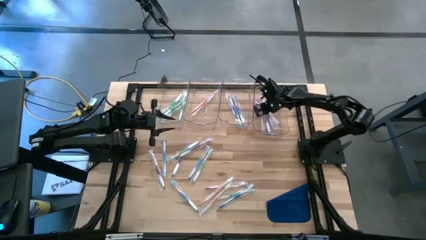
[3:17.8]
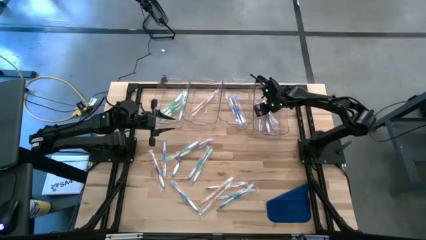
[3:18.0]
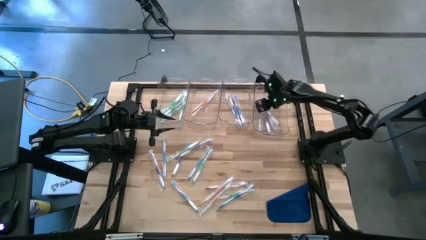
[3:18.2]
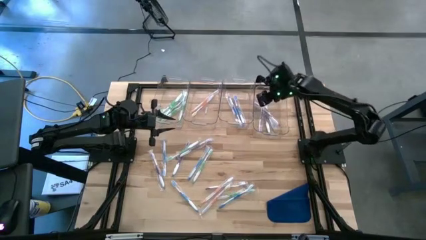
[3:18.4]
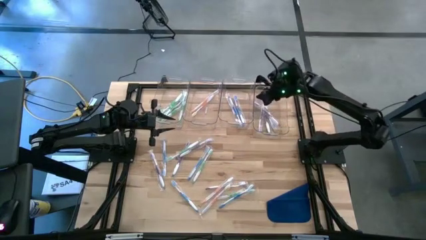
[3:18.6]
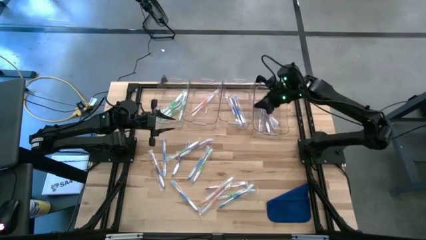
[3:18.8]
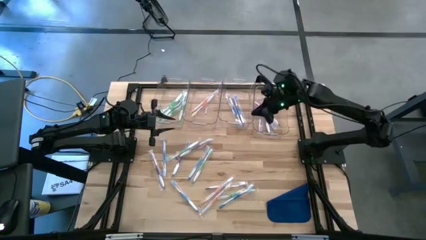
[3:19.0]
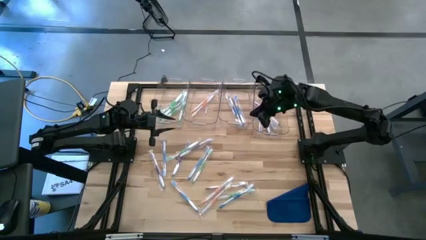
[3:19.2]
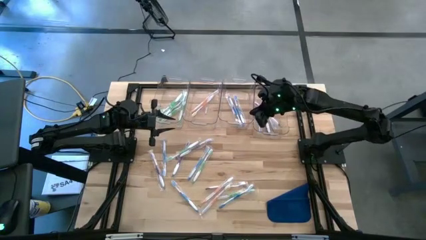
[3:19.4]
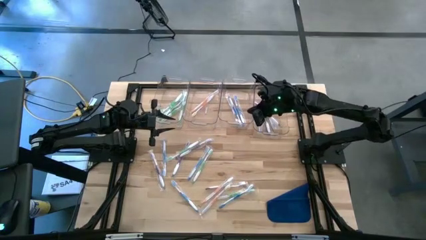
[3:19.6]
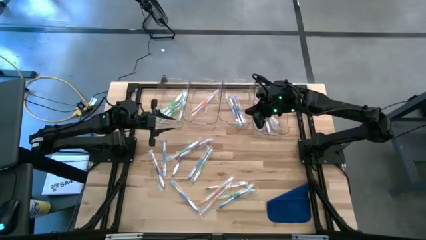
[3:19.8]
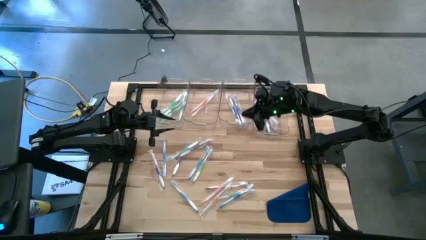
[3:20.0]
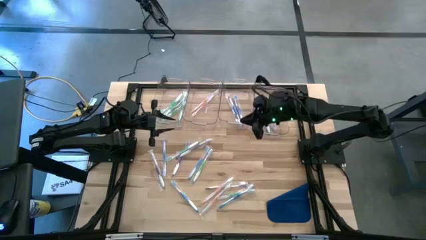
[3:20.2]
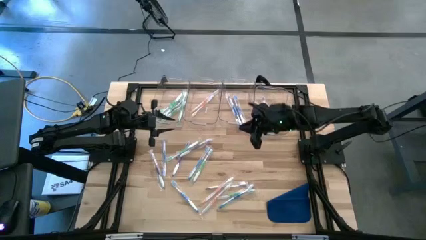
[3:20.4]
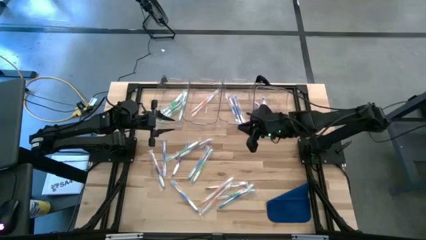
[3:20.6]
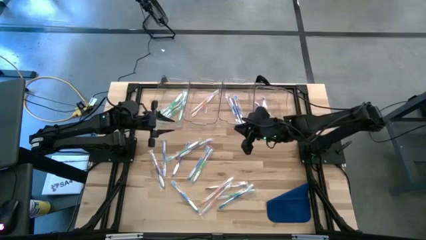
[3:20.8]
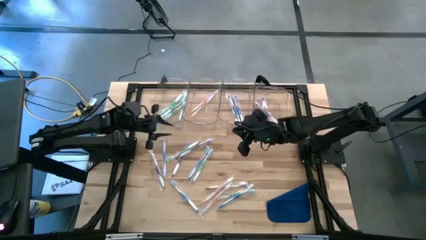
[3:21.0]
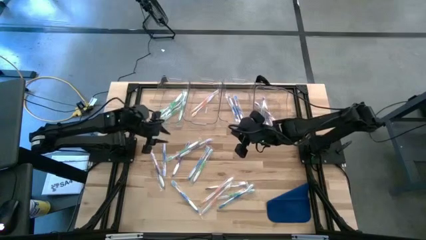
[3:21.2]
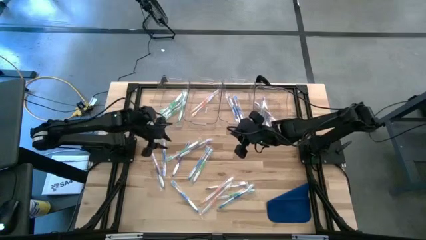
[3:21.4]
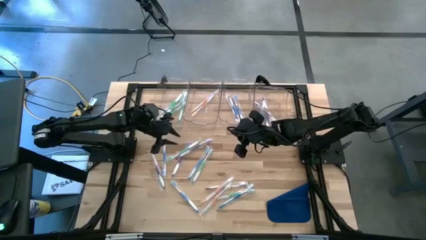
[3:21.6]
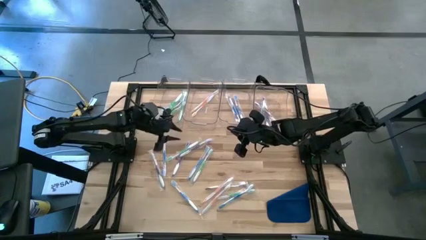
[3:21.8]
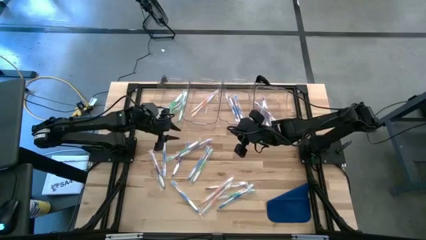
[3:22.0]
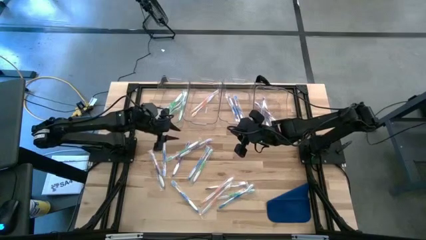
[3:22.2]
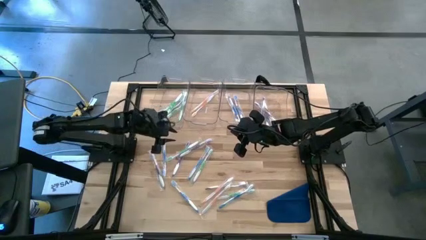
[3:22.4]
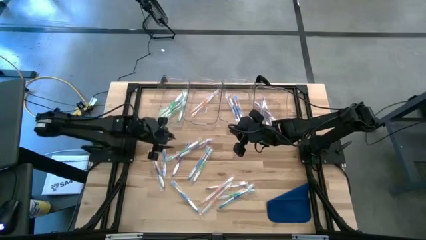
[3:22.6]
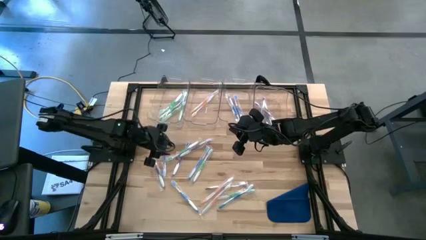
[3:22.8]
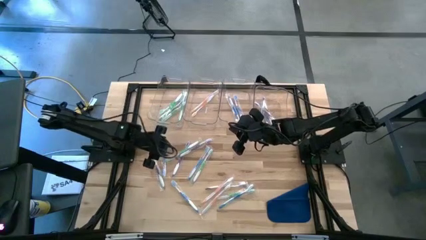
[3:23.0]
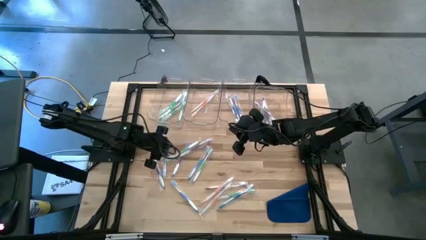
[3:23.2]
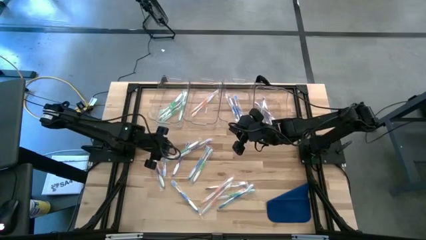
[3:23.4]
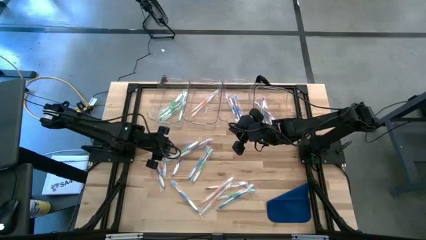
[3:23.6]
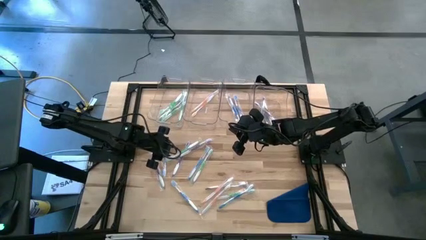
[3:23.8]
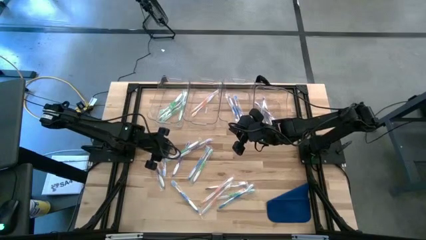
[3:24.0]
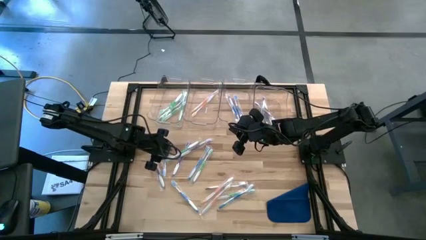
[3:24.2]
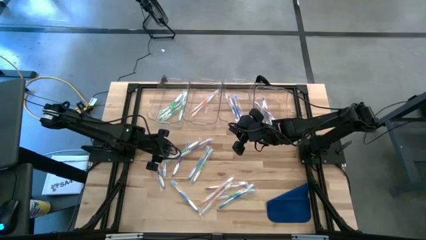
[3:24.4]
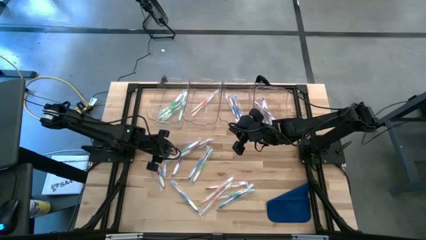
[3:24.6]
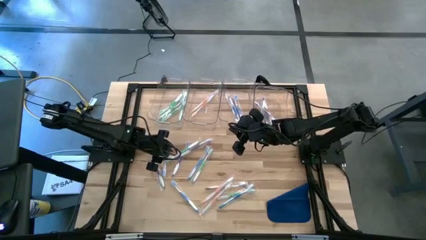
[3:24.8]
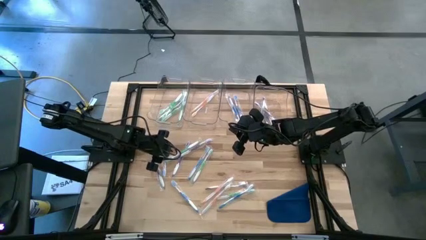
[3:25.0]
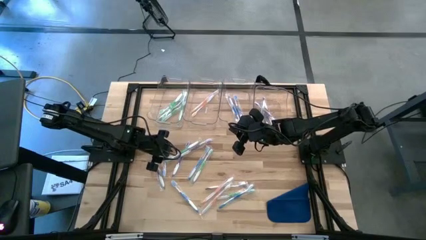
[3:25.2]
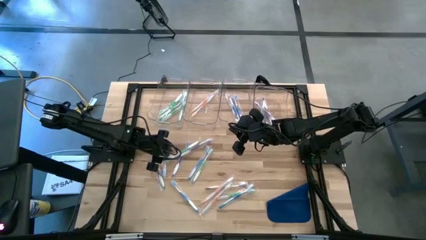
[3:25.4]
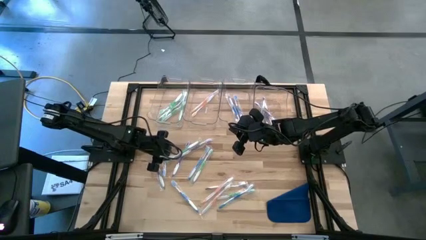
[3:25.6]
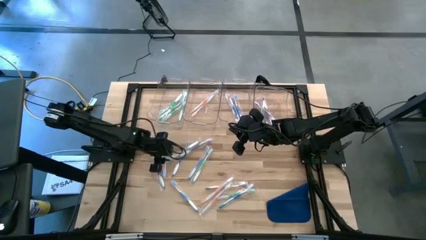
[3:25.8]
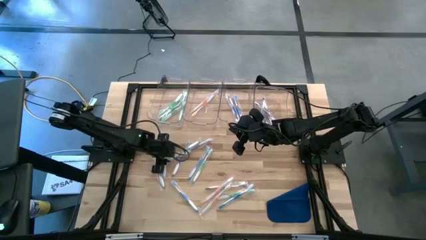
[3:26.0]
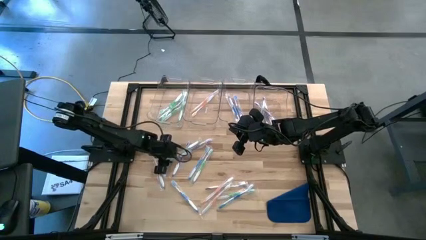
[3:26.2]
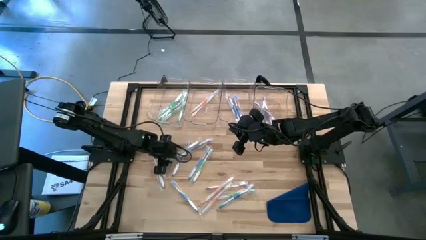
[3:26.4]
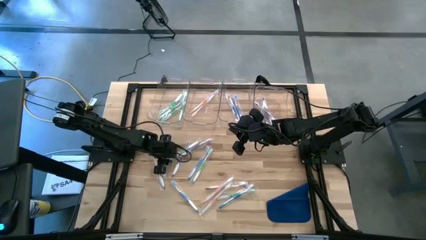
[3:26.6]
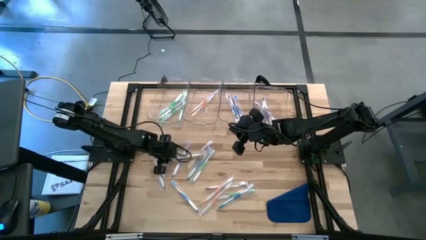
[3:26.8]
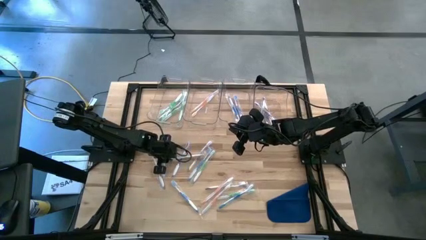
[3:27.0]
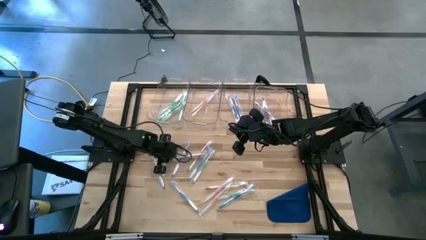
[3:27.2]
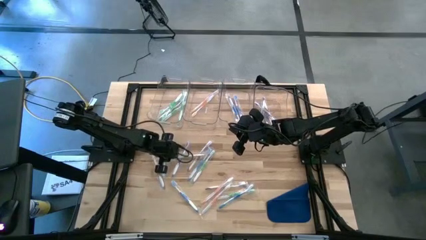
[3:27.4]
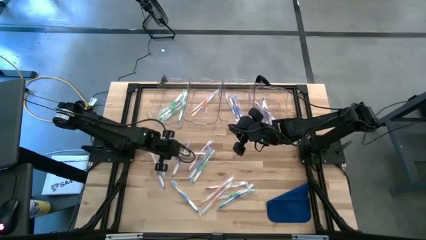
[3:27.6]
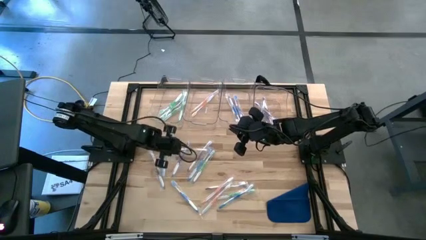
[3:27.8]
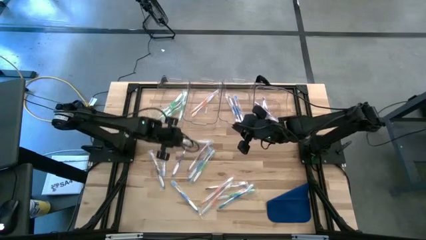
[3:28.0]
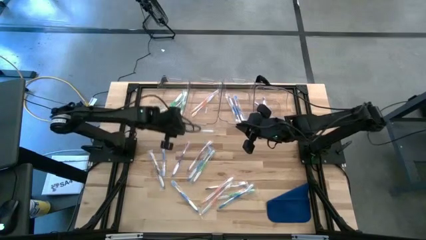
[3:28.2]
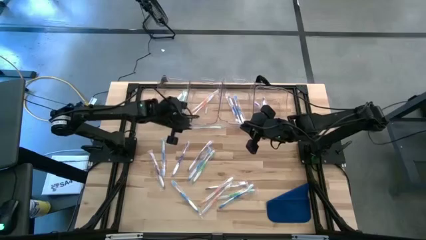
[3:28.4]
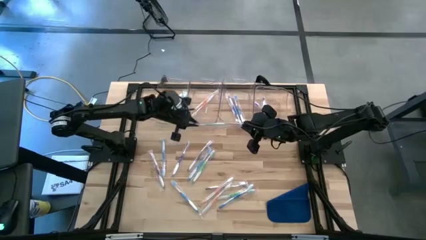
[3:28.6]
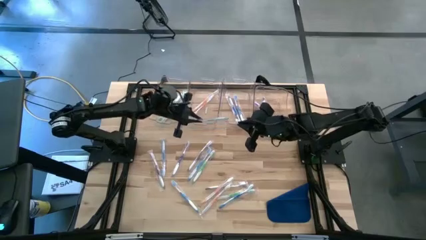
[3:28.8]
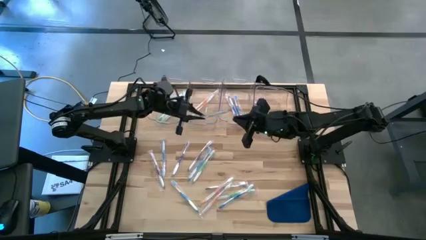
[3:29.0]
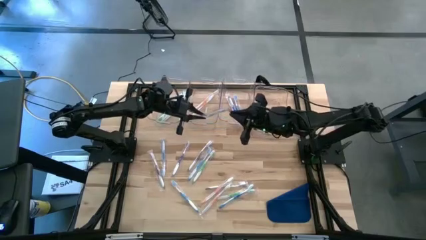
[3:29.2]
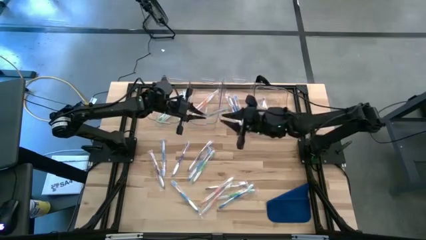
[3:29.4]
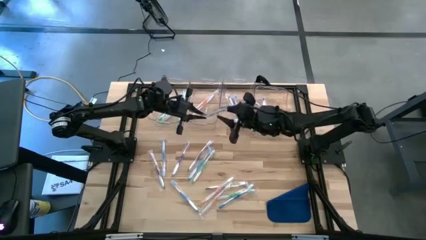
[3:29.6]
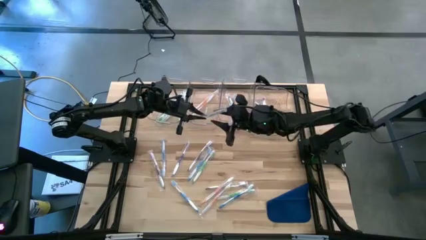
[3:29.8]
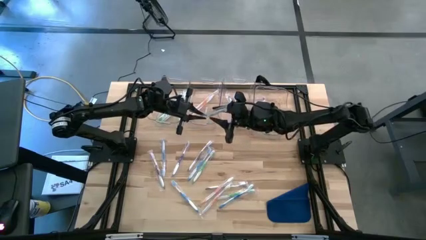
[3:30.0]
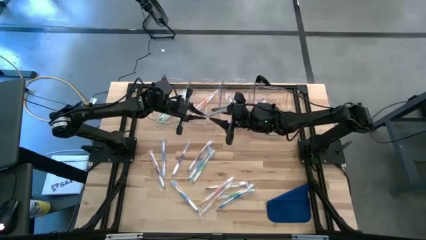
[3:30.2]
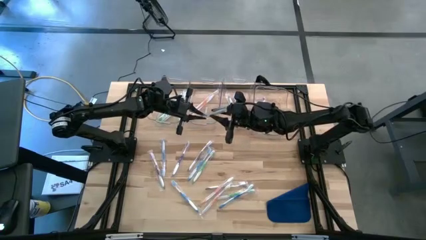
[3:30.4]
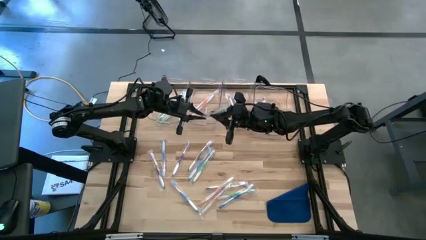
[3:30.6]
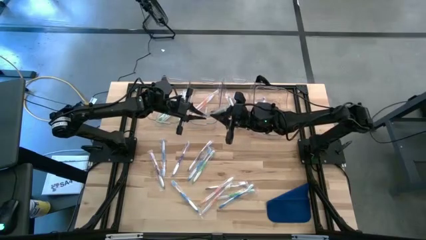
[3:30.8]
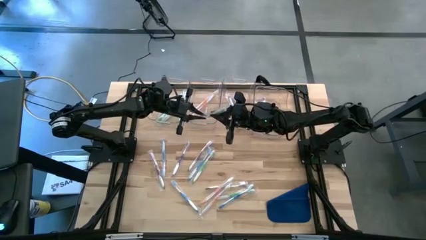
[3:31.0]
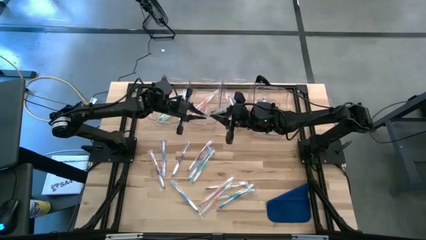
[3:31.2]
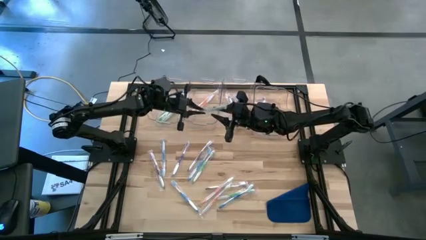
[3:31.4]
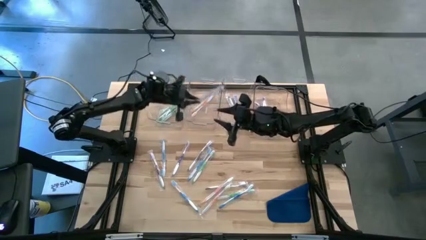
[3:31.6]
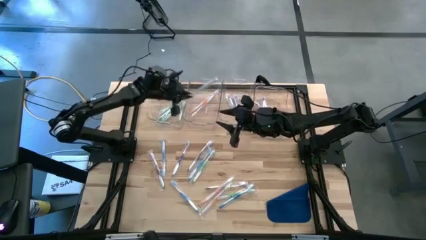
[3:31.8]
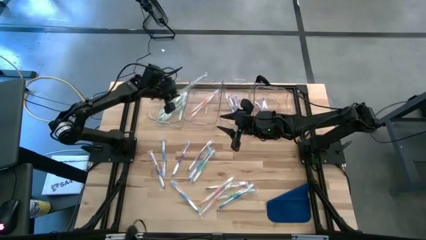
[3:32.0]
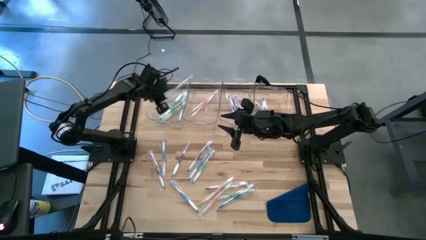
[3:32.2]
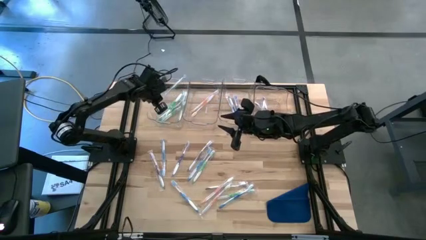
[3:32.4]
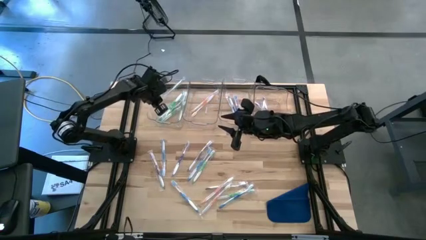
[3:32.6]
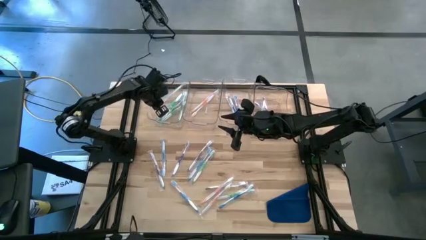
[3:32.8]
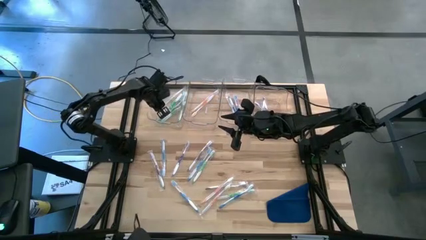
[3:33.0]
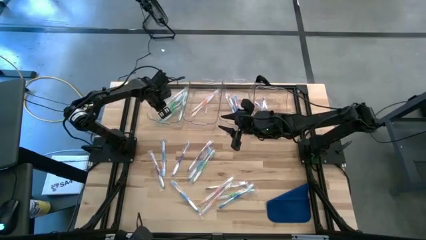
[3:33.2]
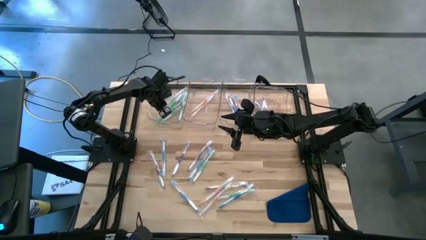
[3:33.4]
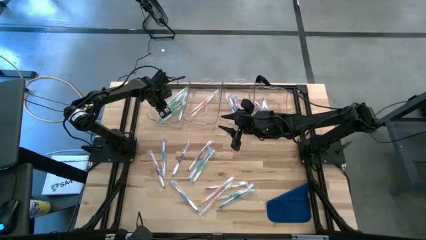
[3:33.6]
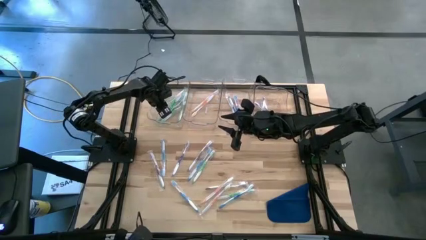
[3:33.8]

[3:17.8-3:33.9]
Task: Pick & Place Toothbrushes
Put the green toothbrush into the left transparent bin

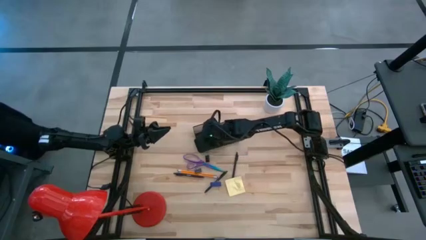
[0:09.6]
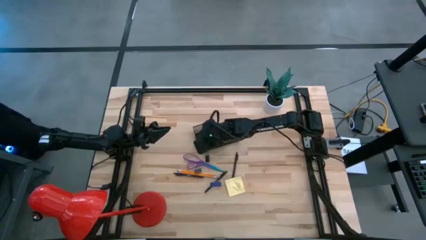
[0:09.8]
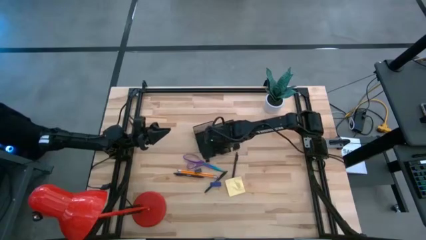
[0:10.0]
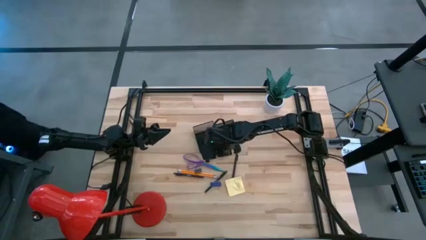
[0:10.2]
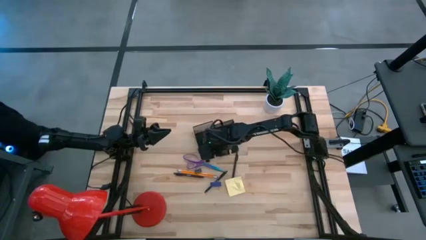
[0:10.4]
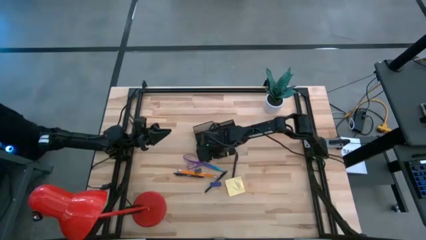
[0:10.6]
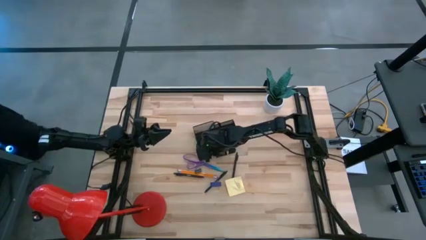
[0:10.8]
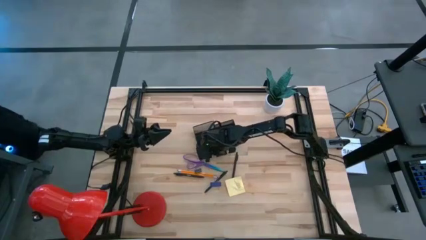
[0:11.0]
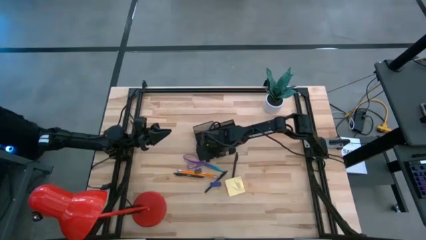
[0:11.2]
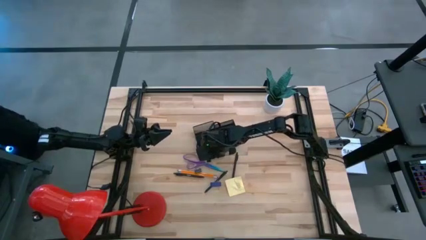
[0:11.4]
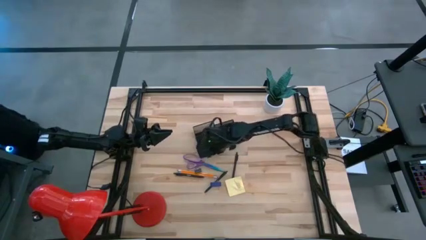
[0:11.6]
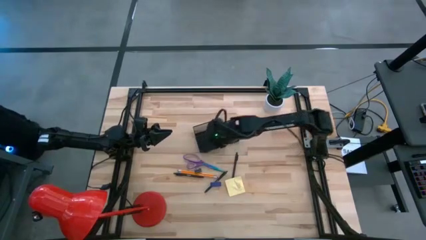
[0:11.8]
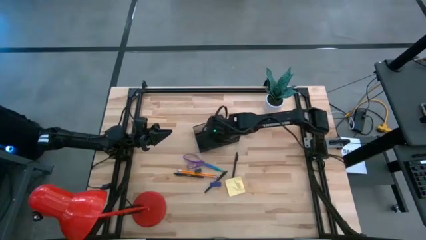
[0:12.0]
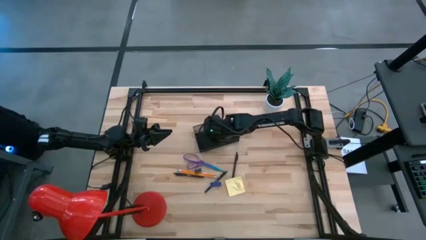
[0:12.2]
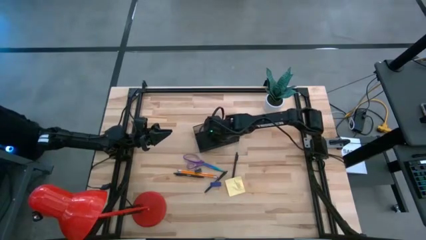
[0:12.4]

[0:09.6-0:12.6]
Task: Pick and place office supplies into organizer
Put the top black binder clip into the black desk organizer
